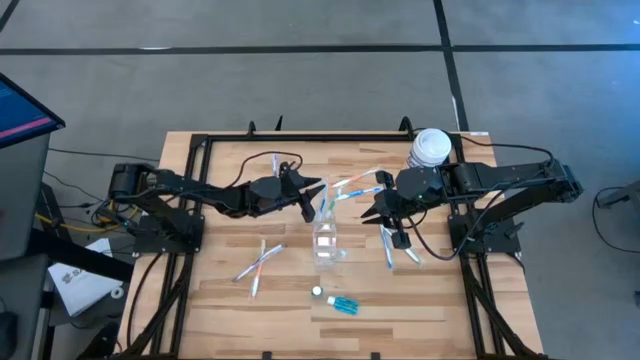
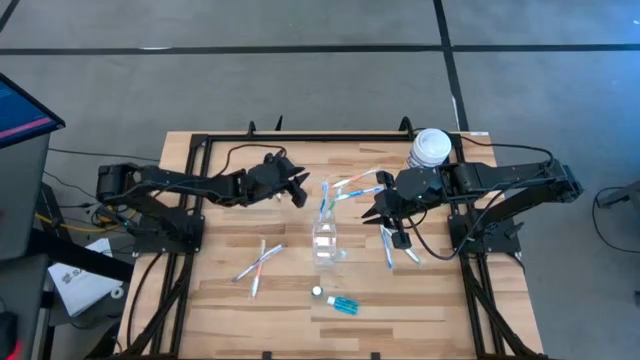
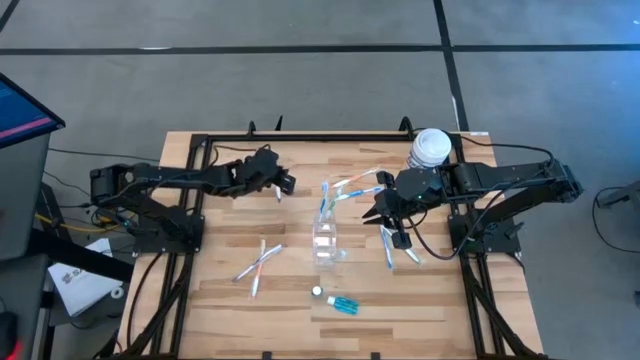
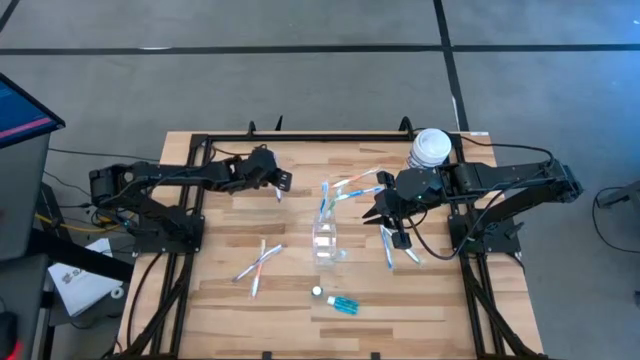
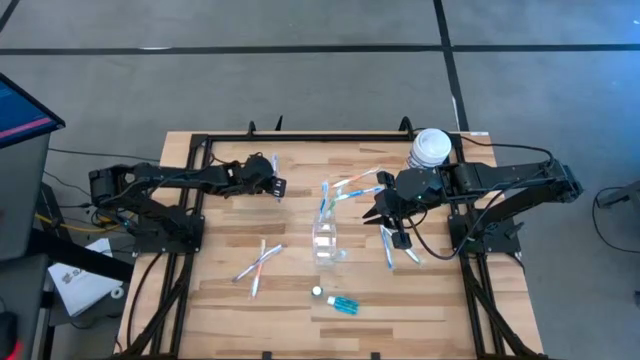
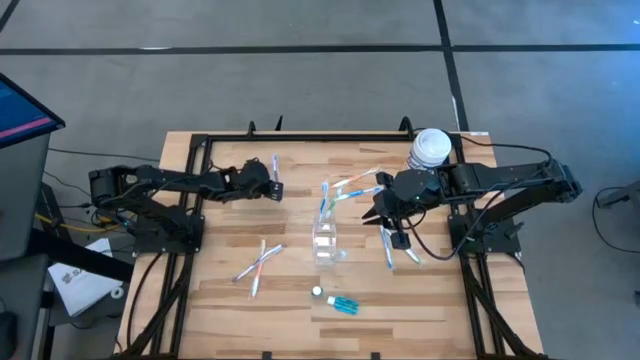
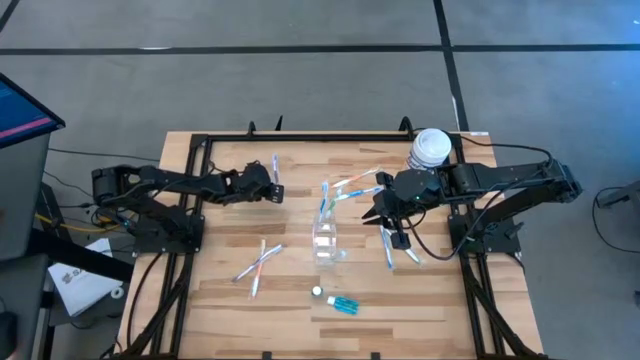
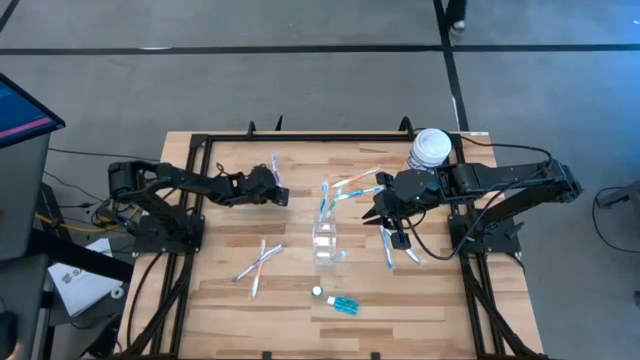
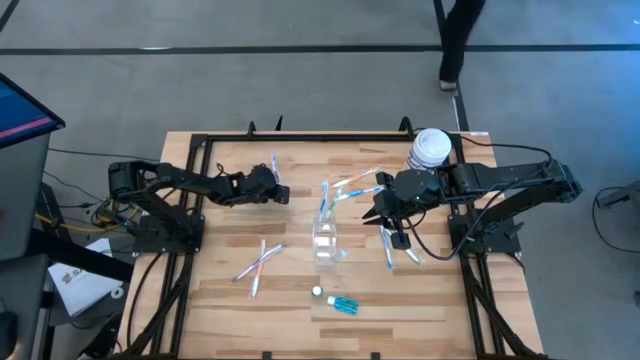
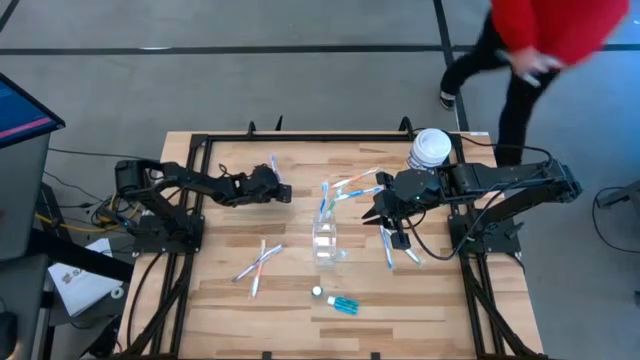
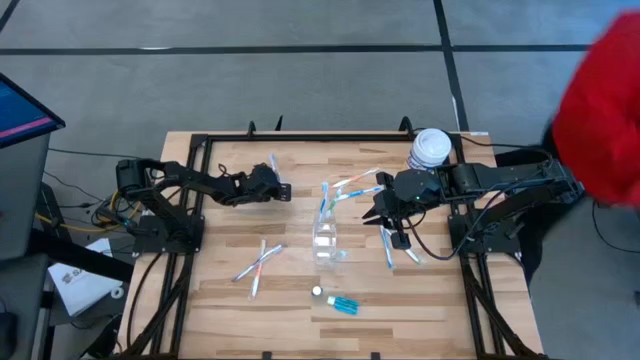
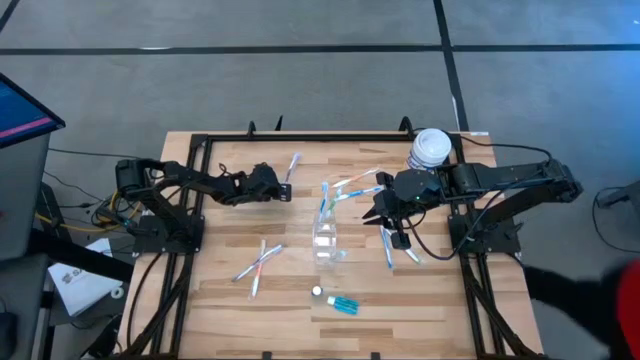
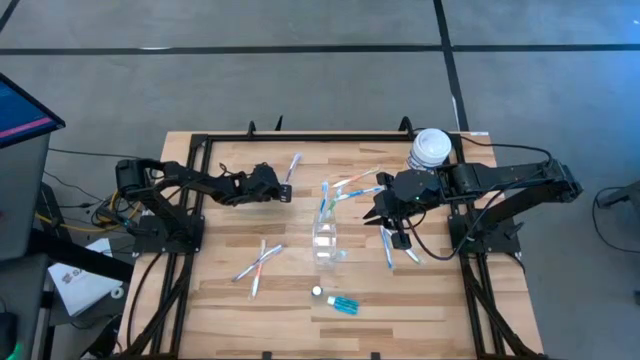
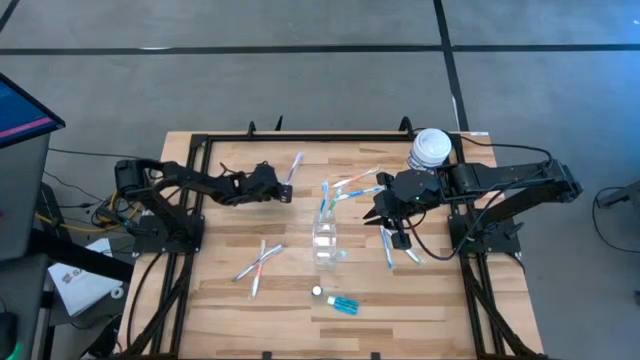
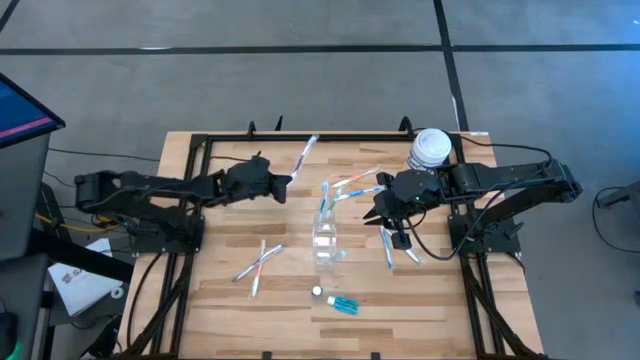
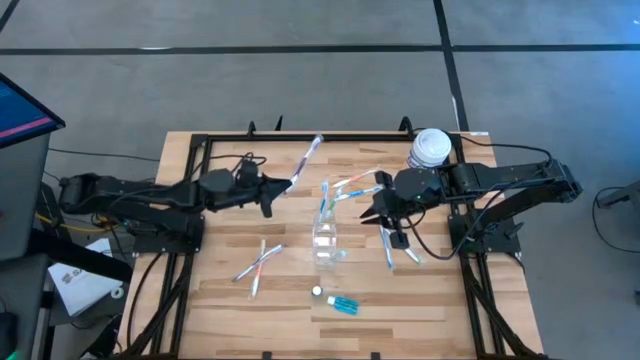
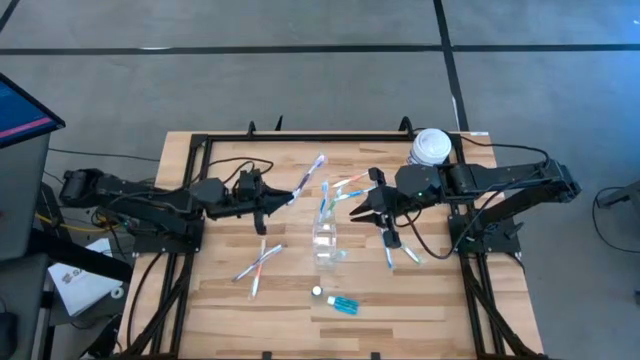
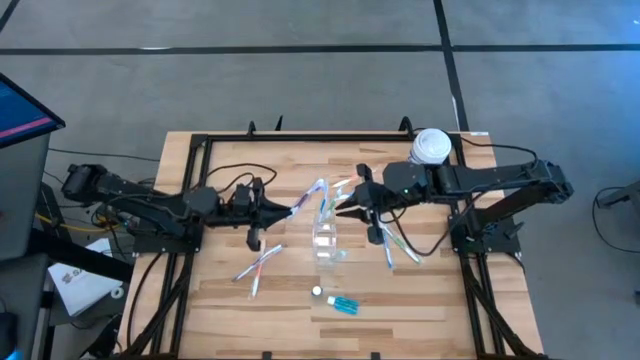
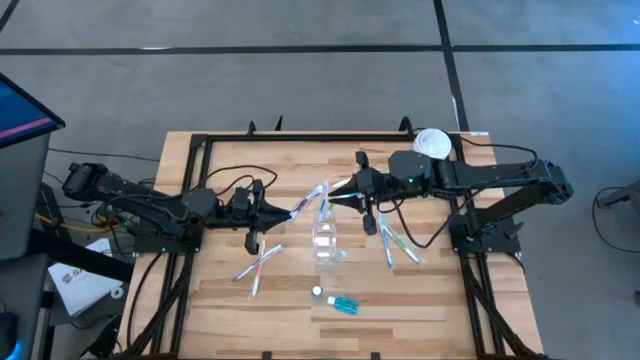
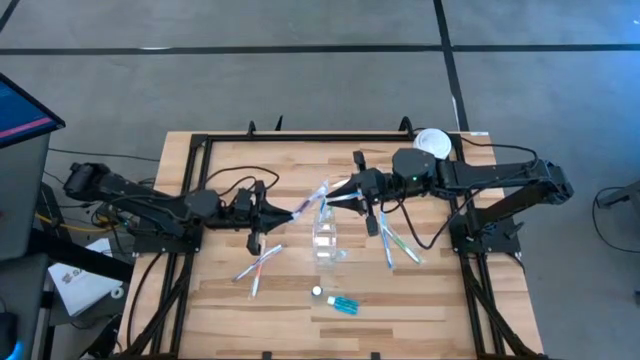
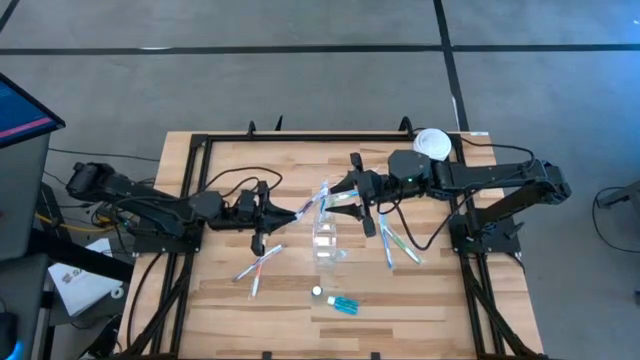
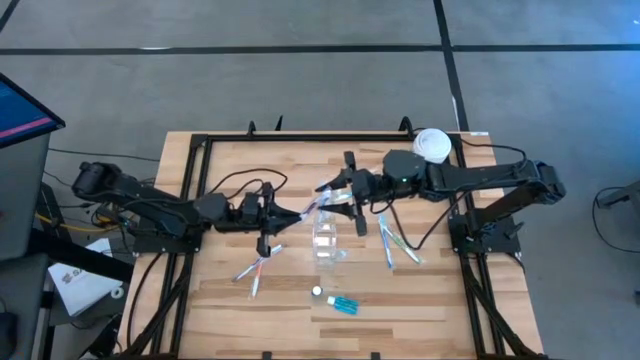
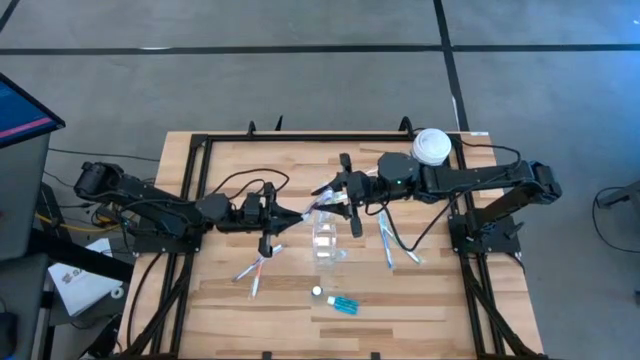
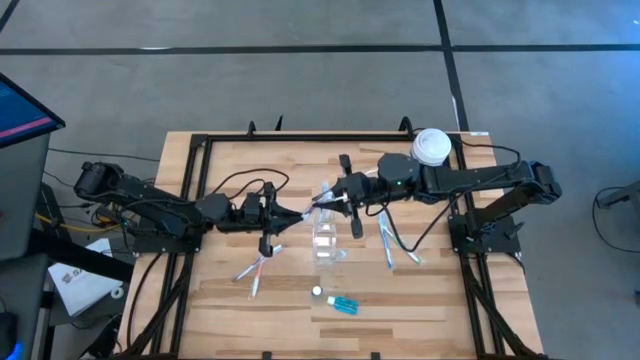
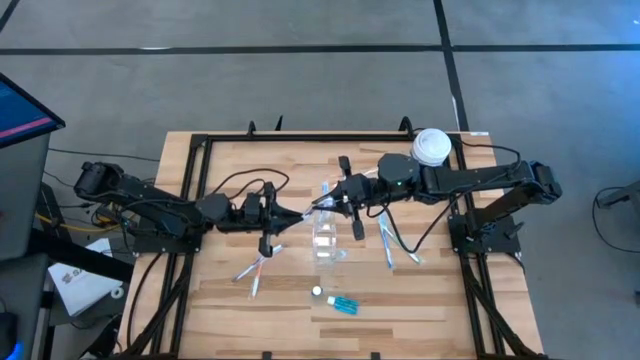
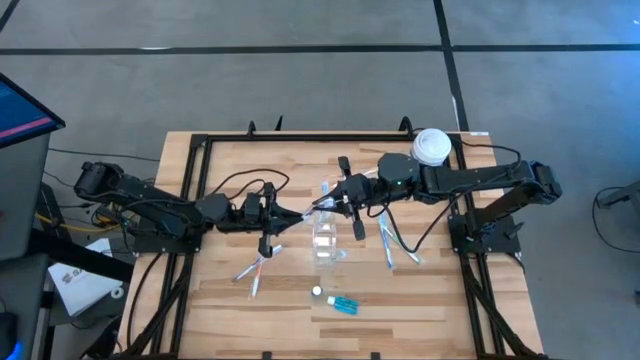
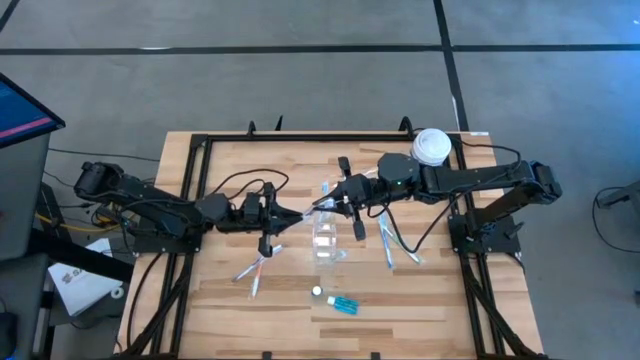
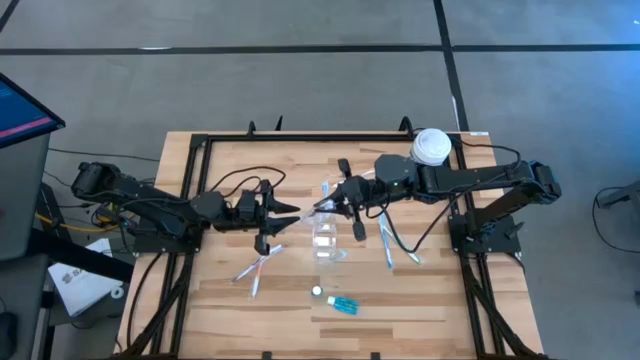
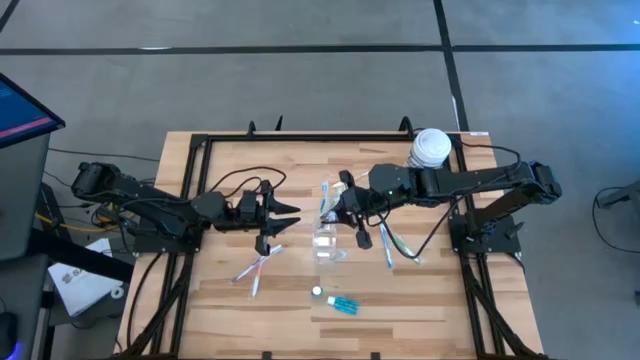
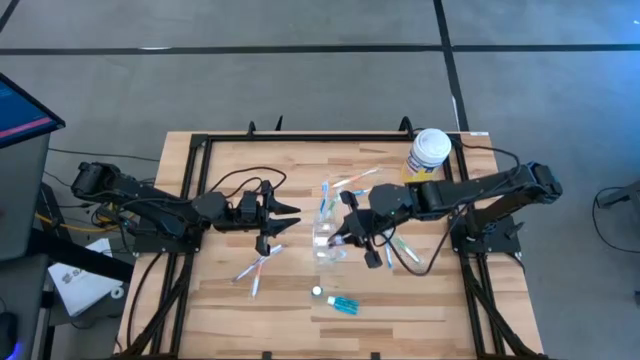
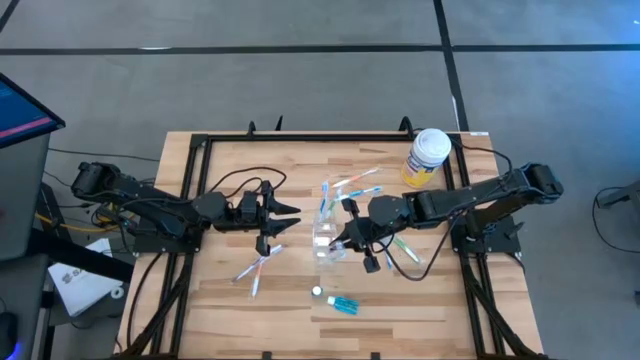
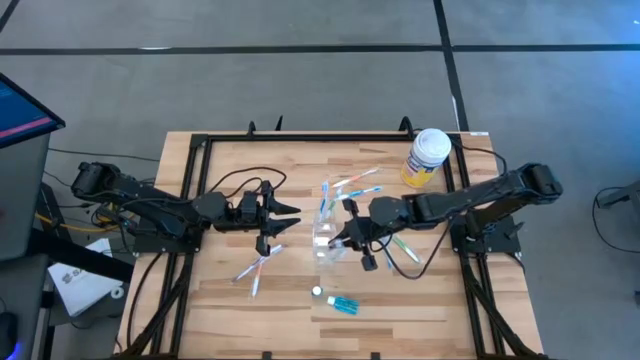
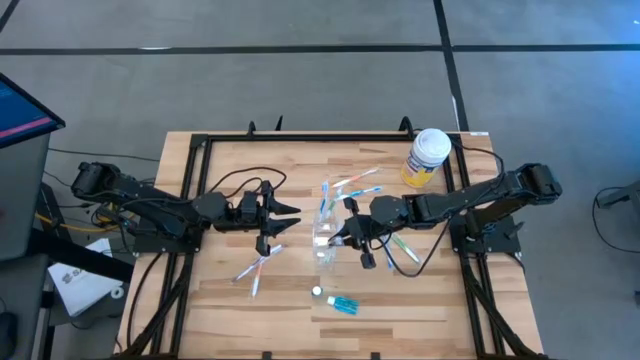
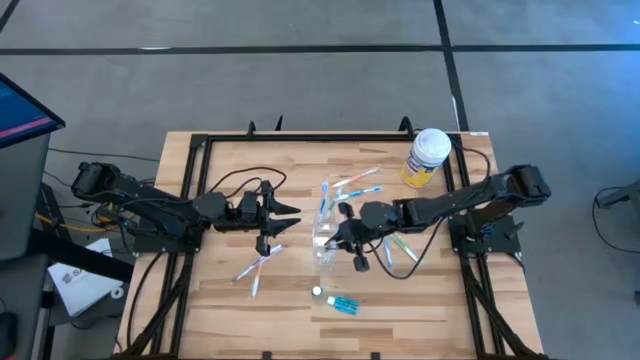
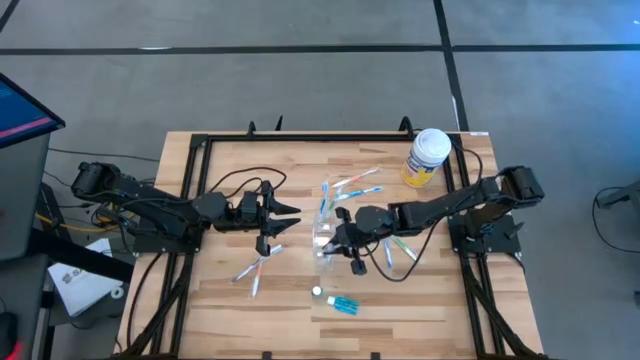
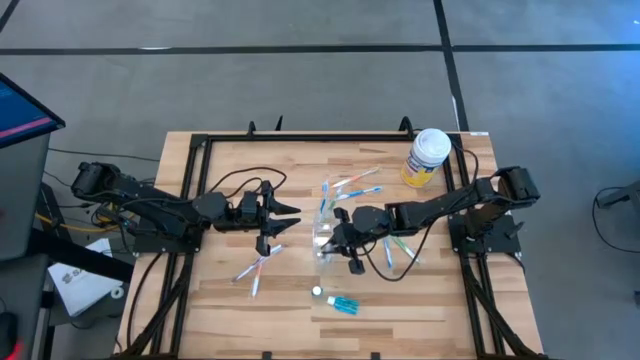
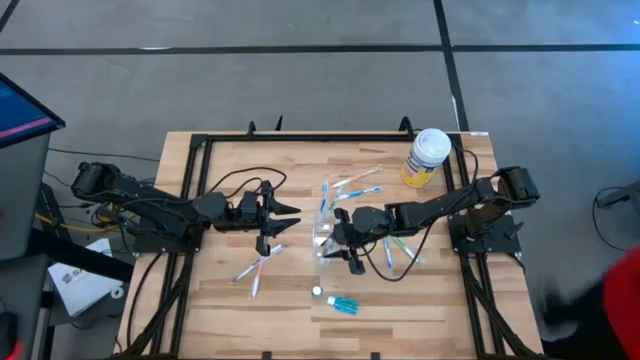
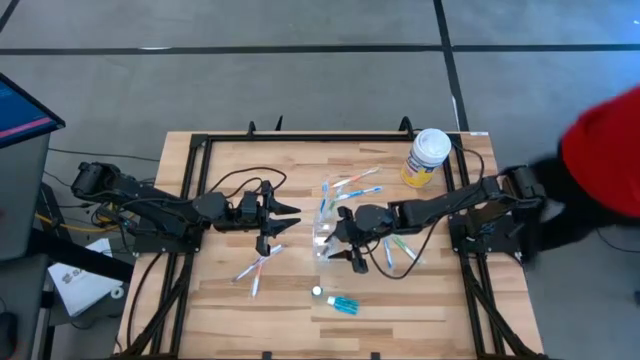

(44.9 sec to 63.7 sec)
Task: Pick & Place toothbrushing station
Put the top violet toothbrush into the transparent organizer

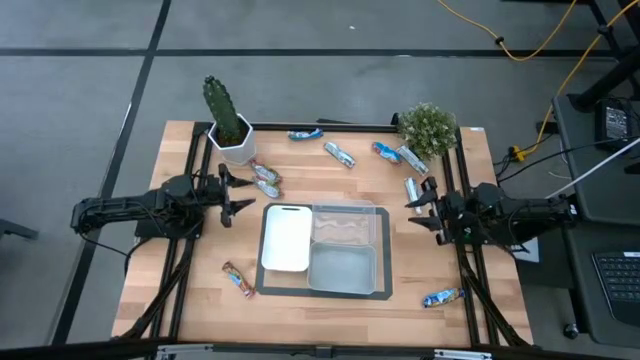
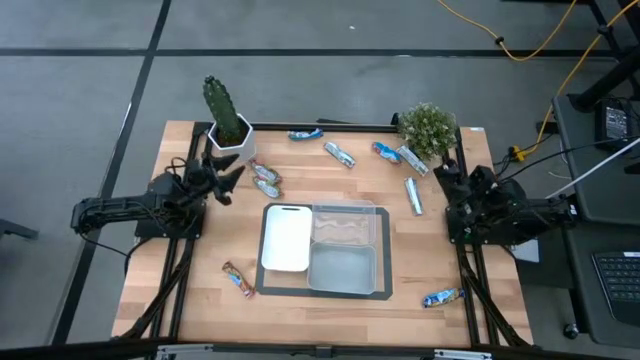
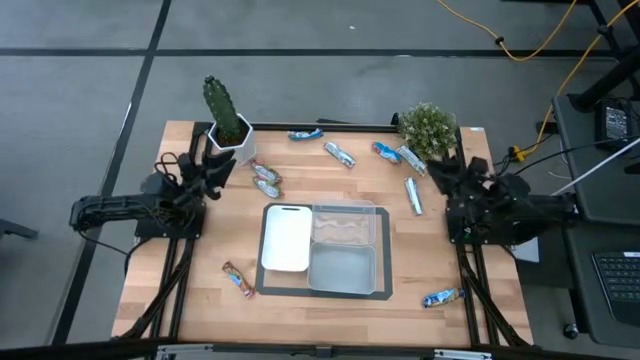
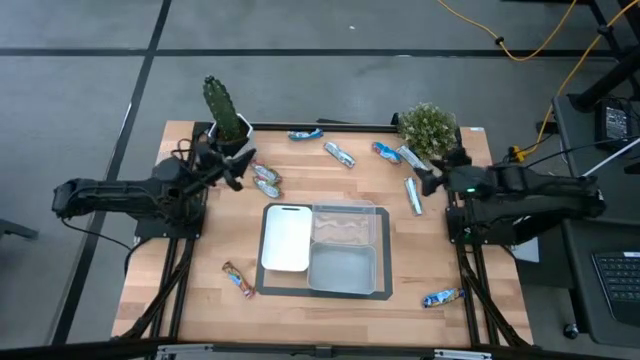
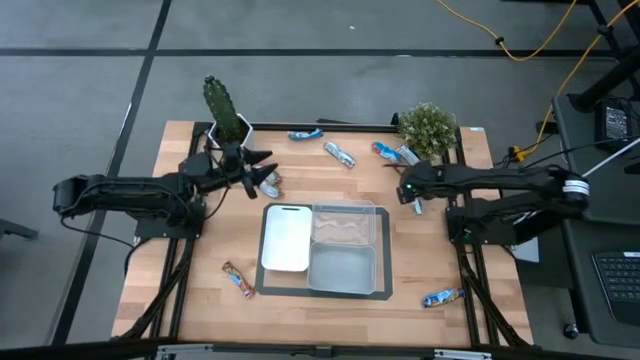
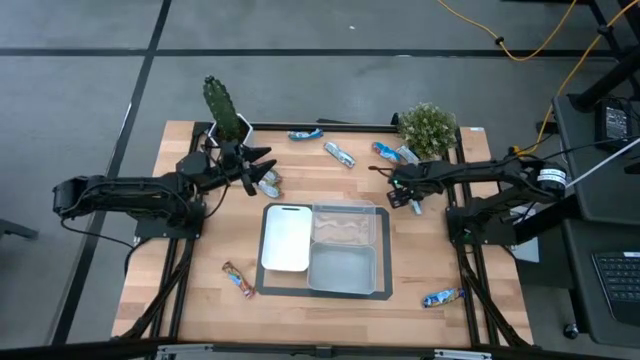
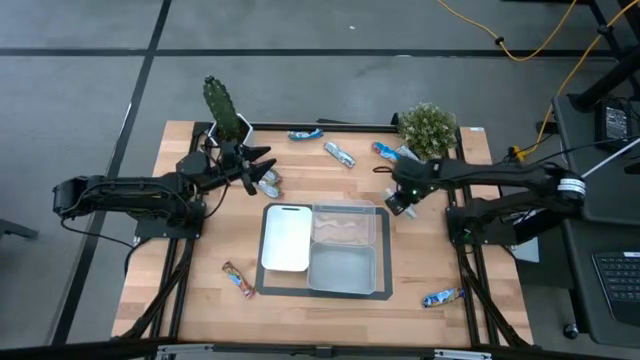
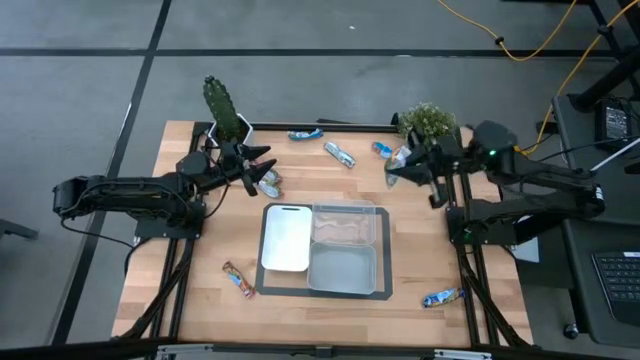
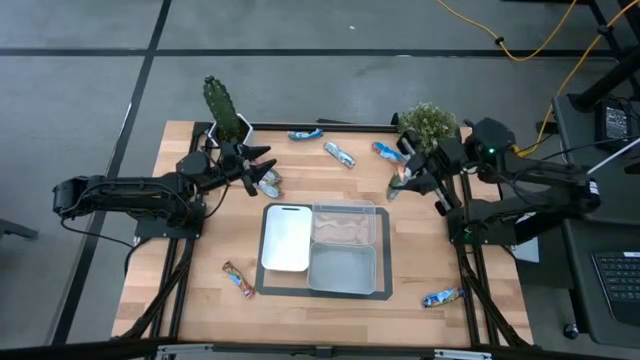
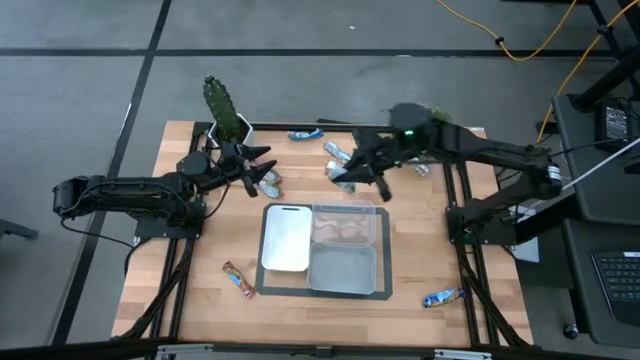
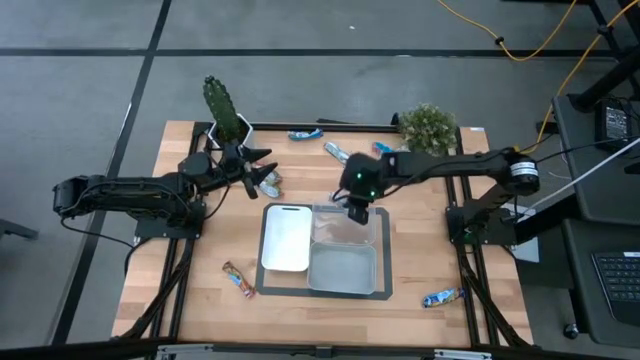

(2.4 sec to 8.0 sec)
Task: Pick and place Granola Bars by type
Put the yellow granola bar into the transparent bin
